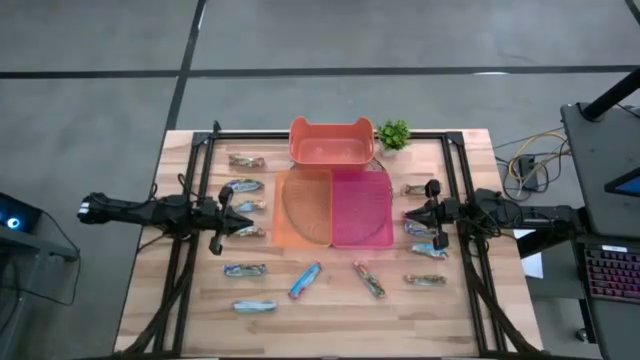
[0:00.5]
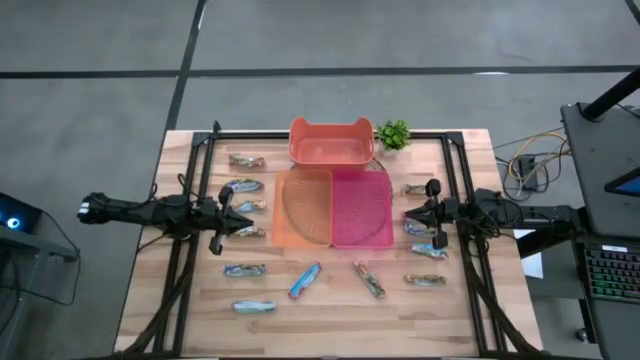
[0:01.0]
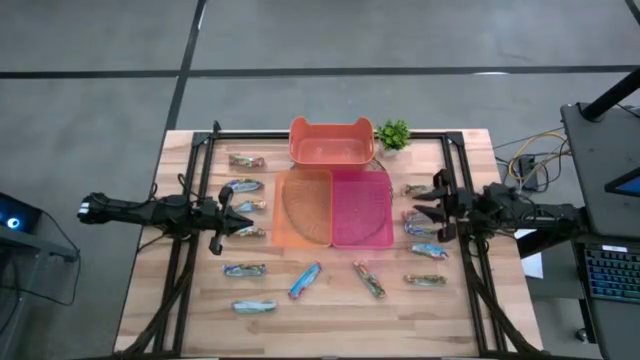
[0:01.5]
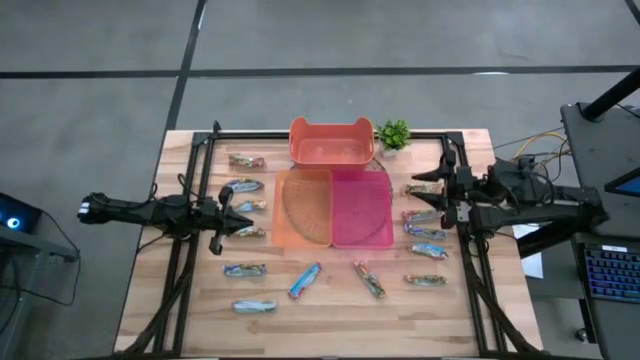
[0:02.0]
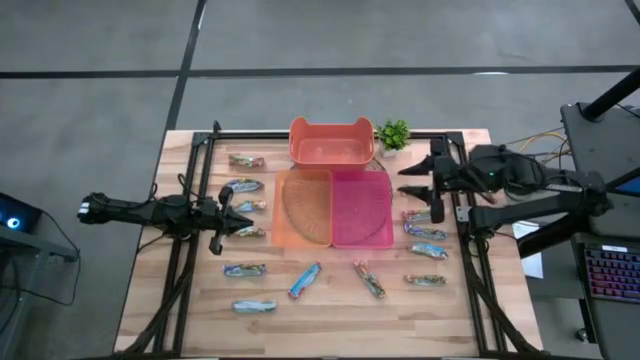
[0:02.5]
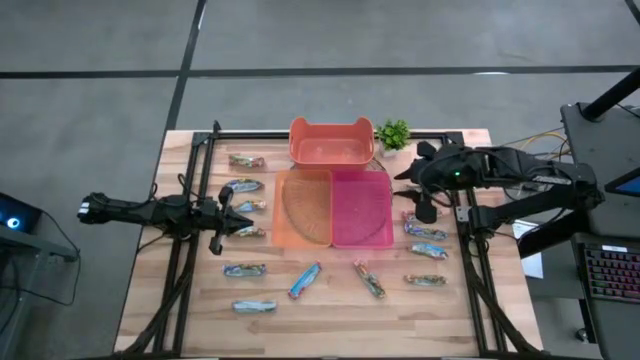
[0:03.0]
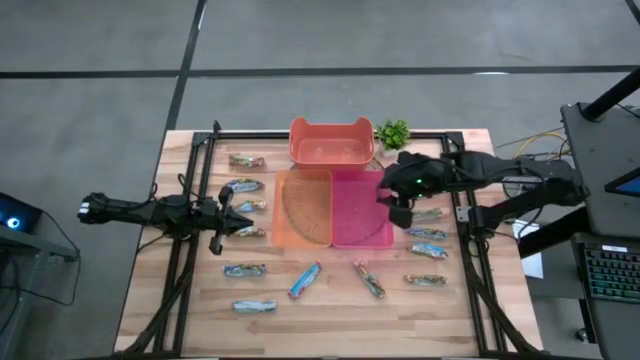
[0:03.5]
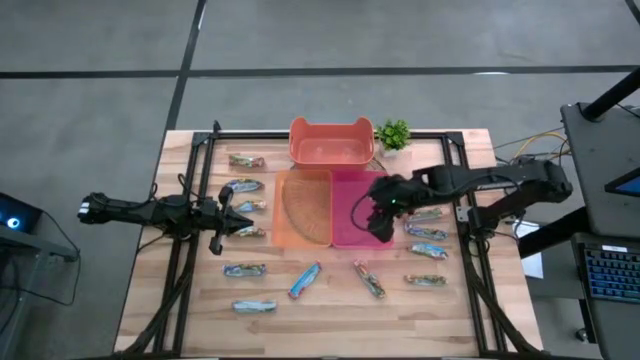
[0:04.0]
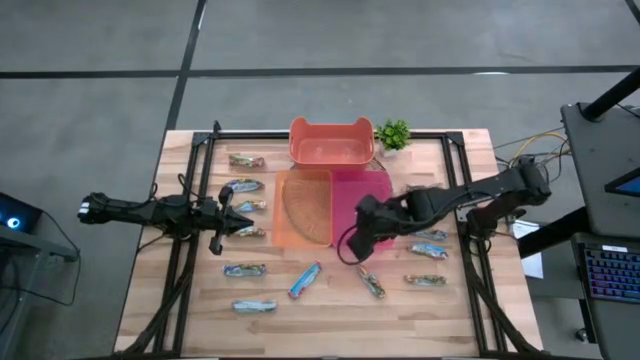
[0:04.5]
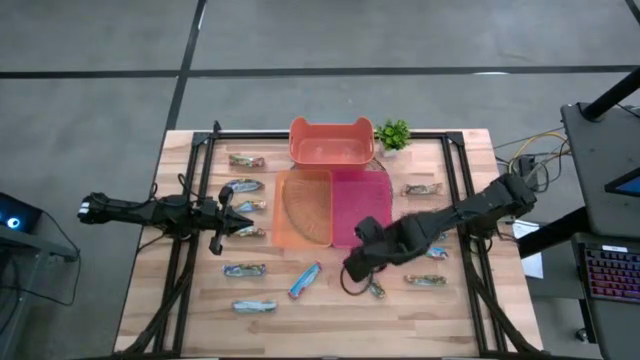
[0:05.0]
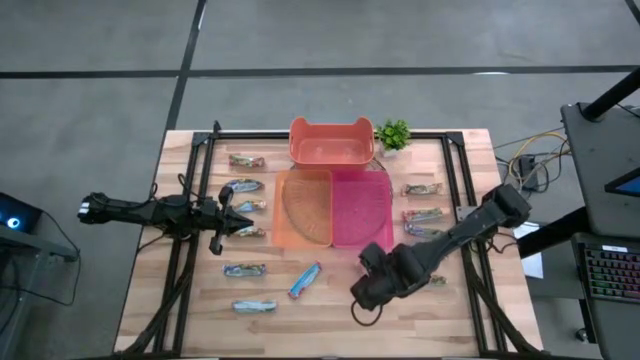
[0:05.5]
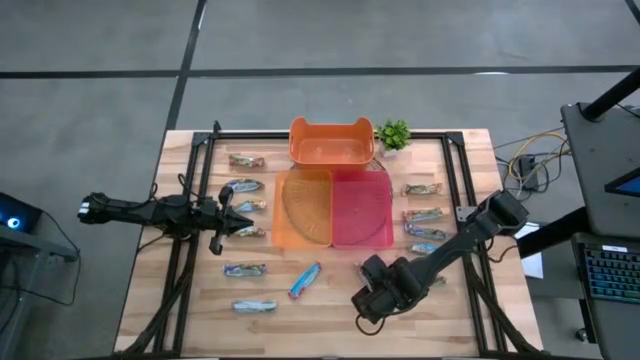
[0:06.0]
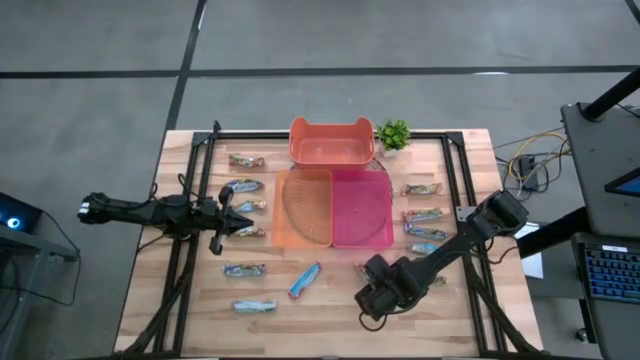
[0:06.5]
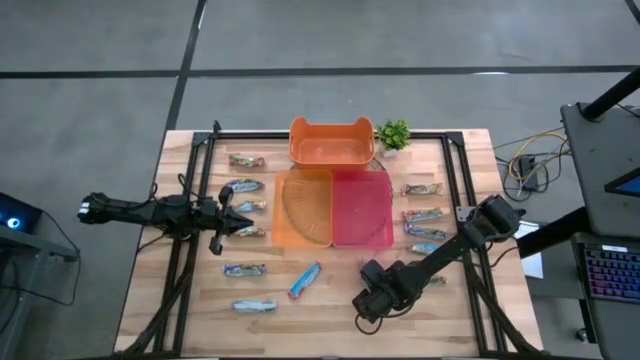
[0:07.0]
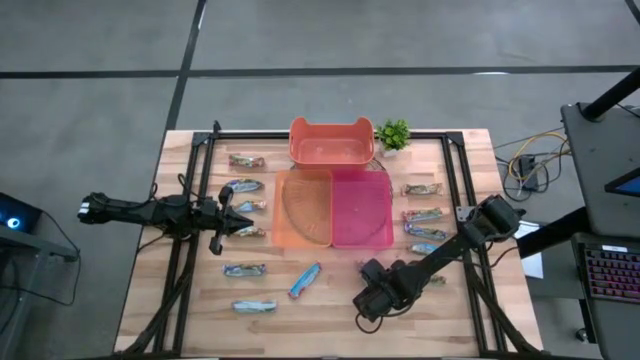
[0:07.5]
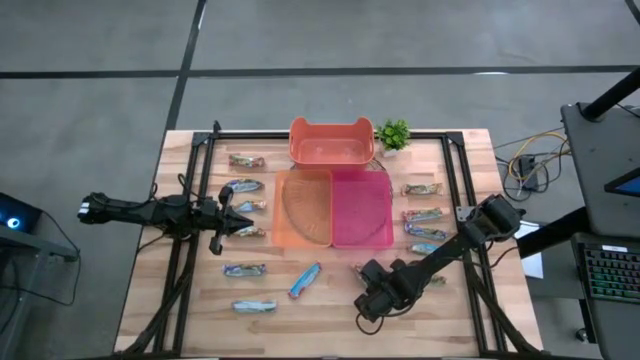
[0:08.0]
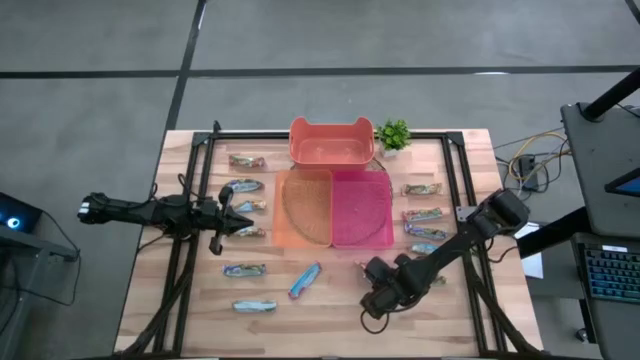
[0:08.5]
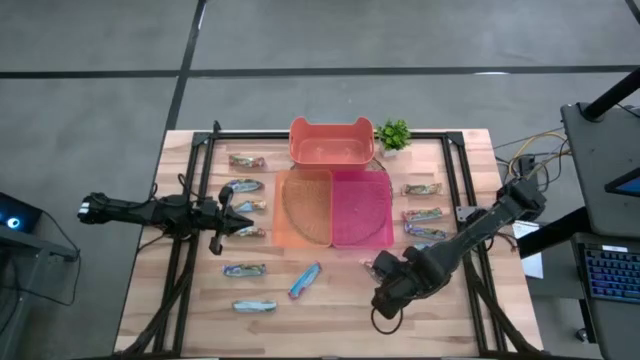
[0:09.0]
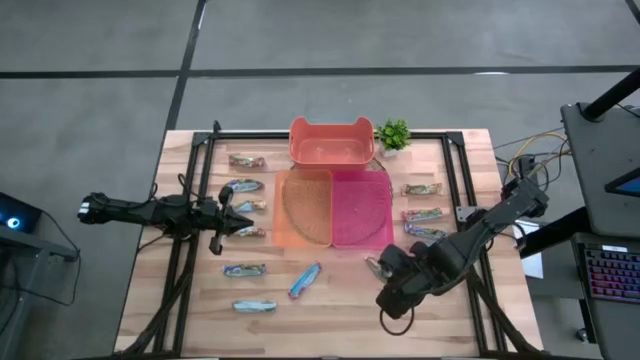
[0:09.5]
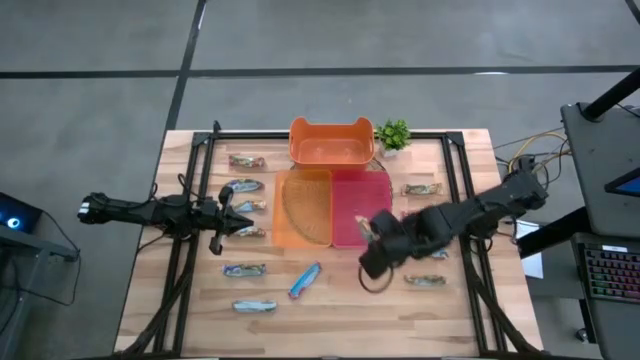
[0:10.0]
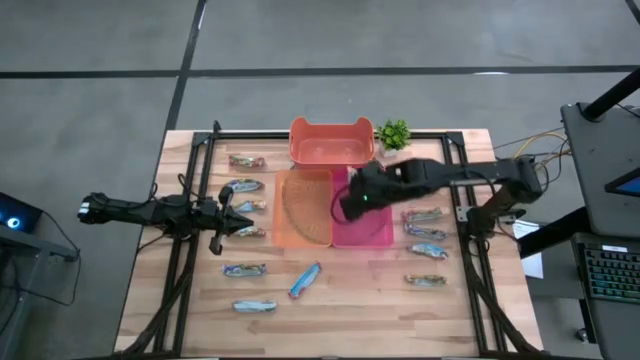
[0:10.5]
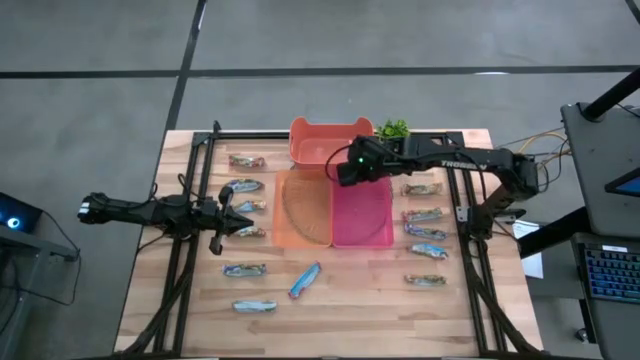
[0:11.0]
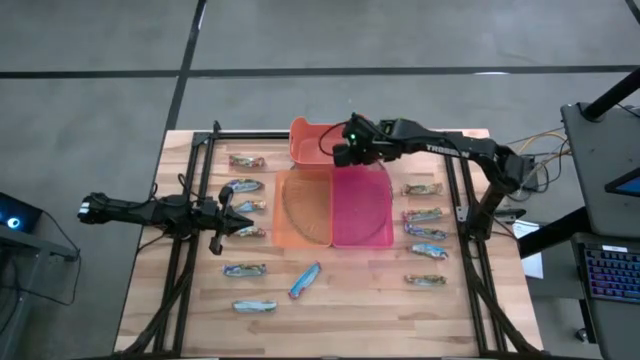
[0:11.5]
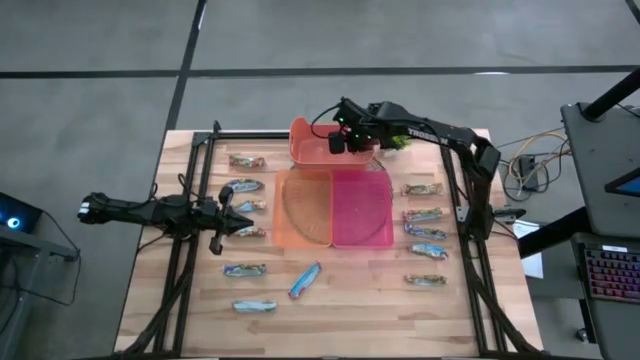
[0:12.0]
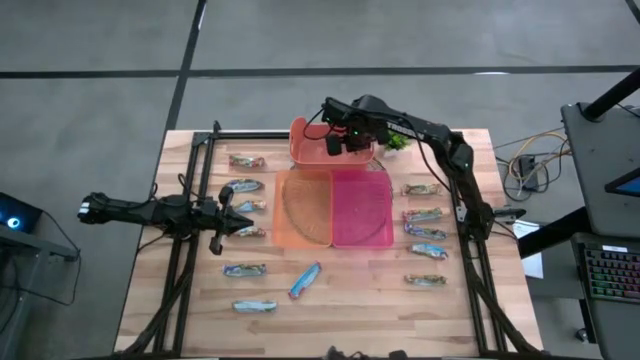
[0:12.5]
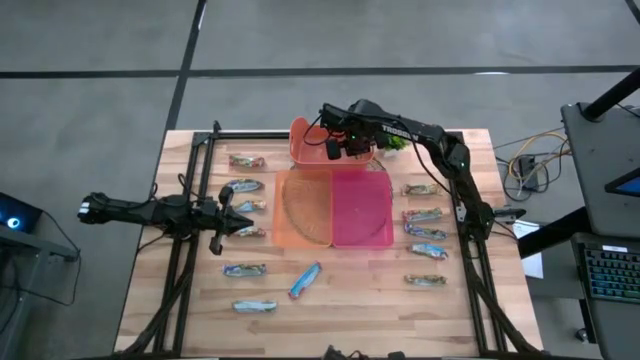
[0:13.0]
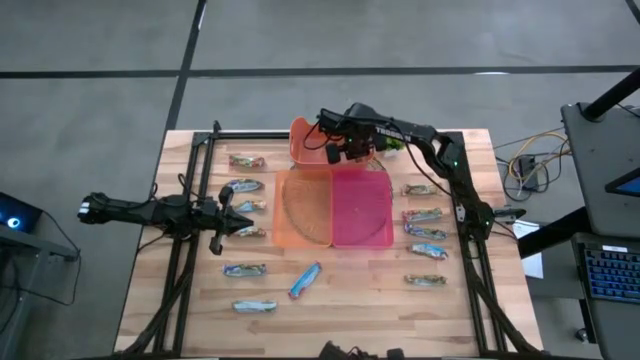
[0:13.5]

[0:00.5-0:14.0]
Task: Pick and place Granola Bars by type
Put the yellow granola bar into the orange bin

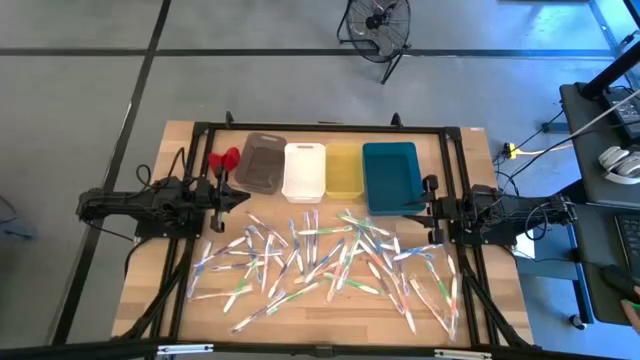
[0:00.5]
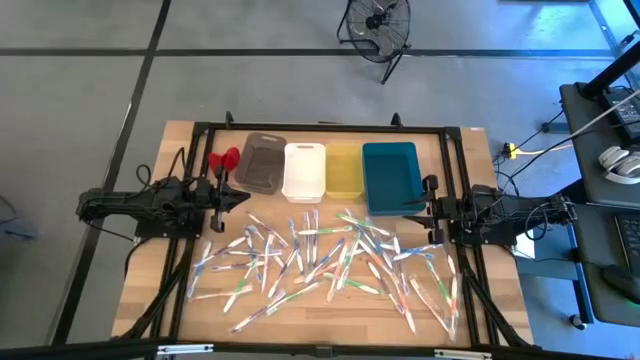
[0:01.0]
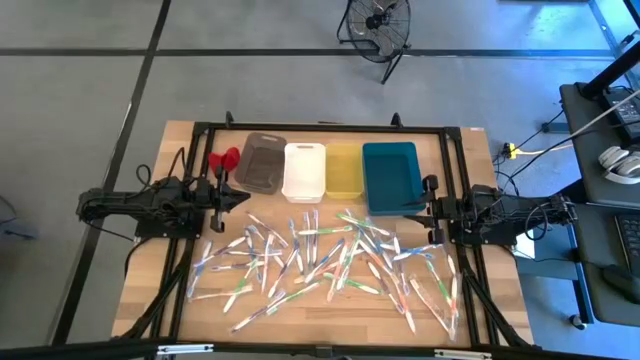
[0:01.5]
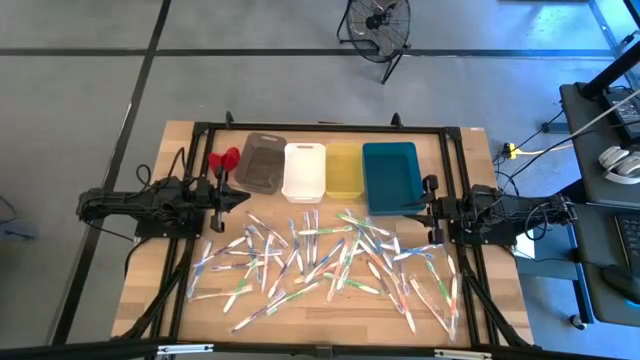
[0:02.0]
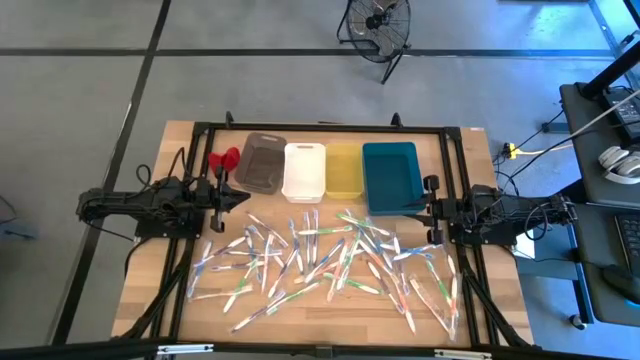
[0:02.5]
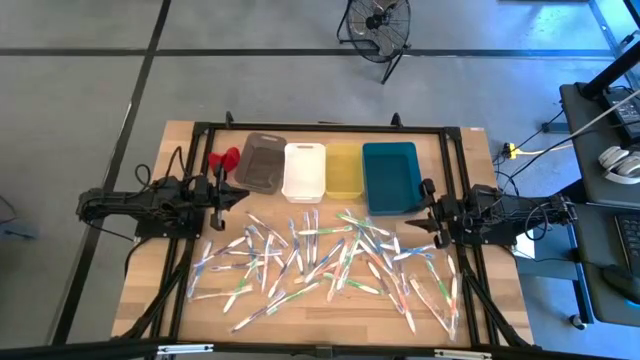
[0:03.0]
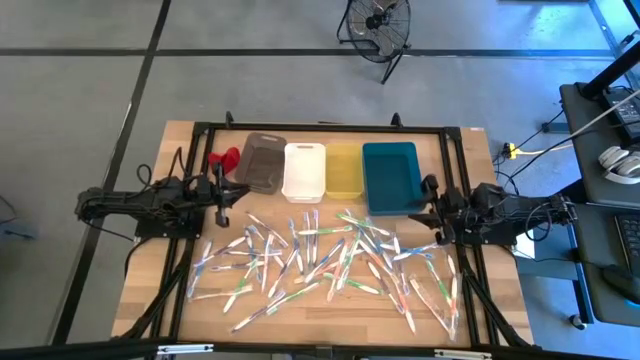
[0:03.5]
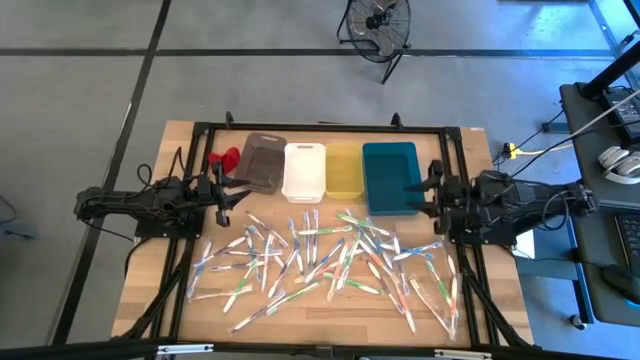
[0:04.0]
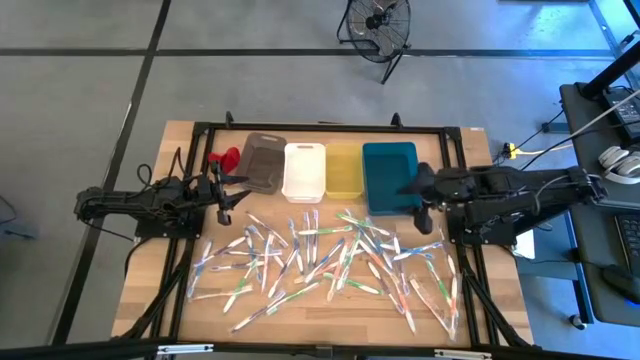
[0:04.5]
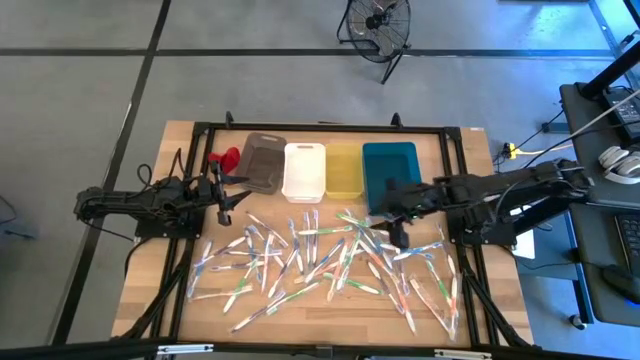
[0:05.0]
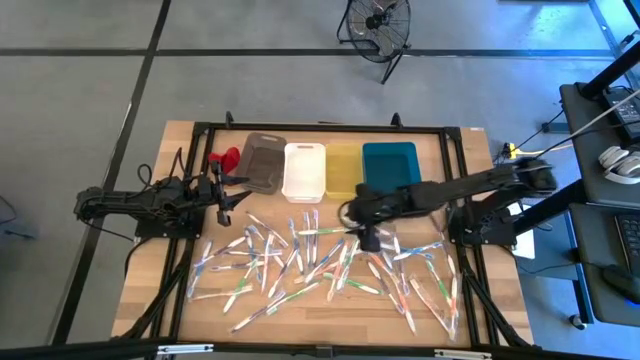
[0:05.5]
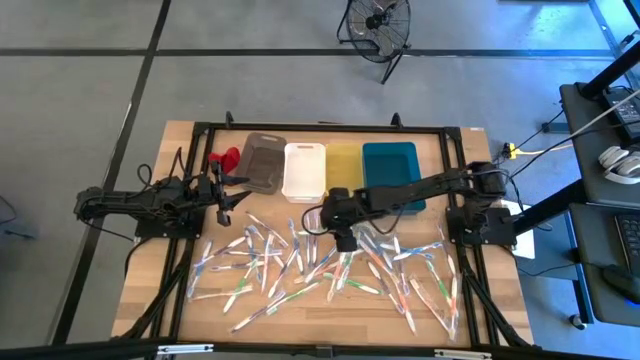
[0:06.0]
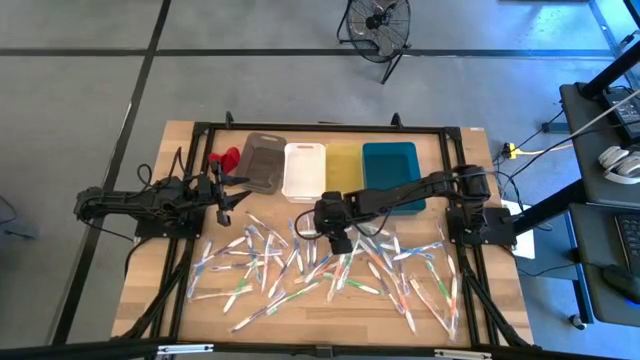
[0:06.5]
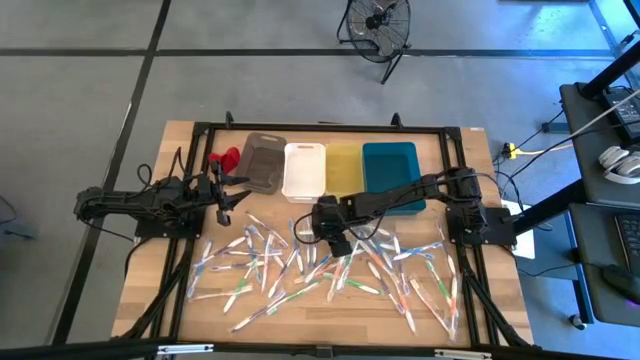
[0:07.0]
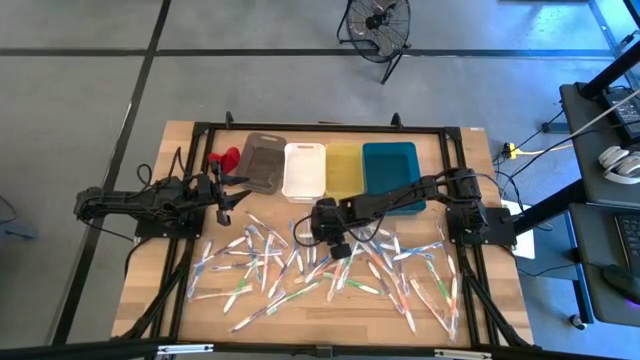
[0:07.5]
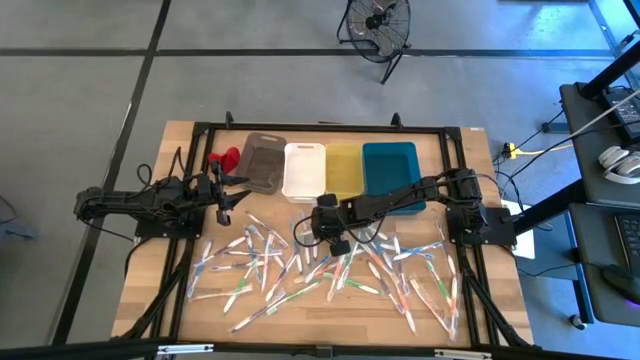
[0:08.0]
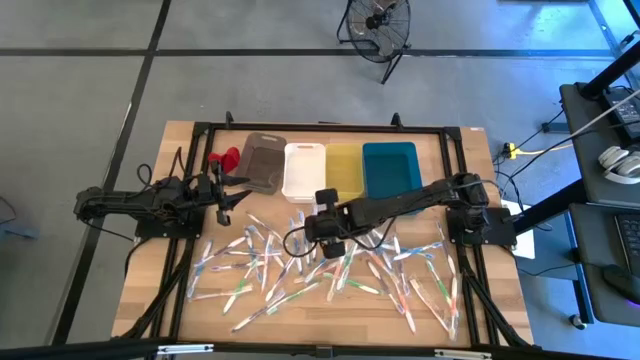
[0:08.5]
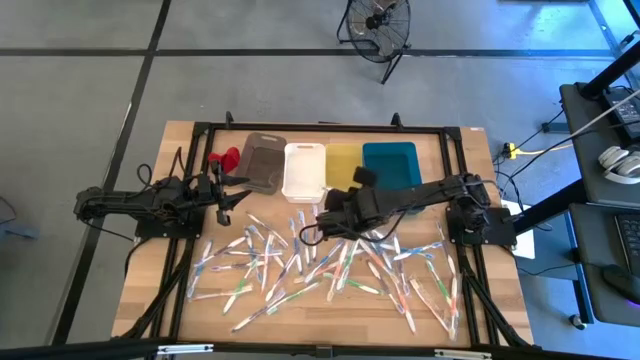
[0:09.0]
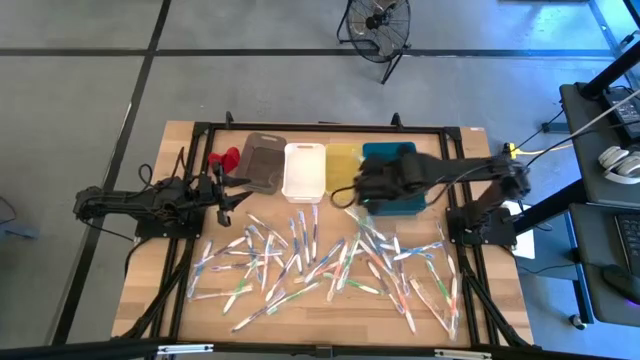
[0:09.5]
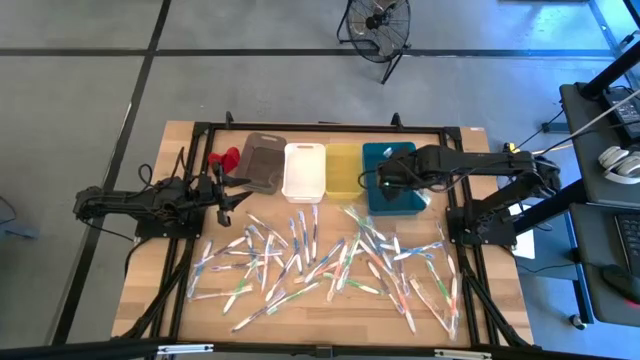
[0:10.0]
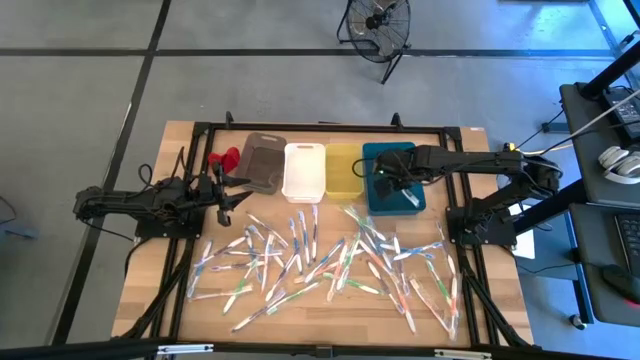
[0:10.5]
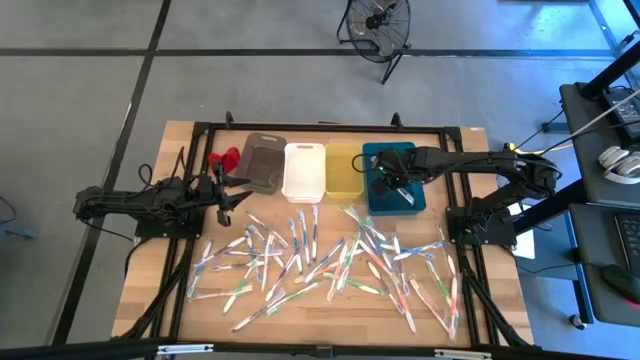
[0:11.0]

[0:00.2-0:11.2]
Task: Pick & Place Toothbrushes
Put the green toothbrush into the blue bin
